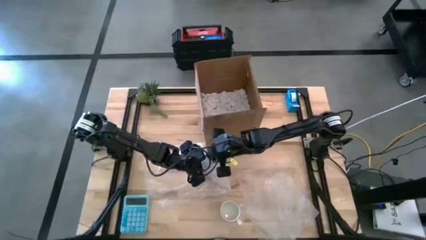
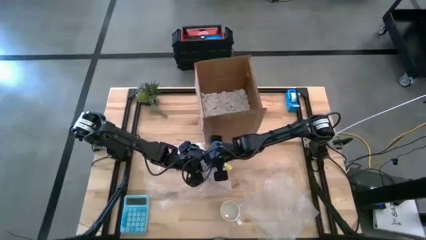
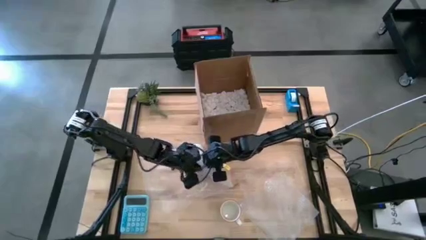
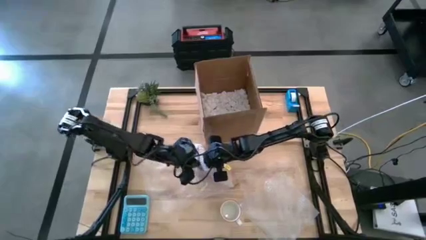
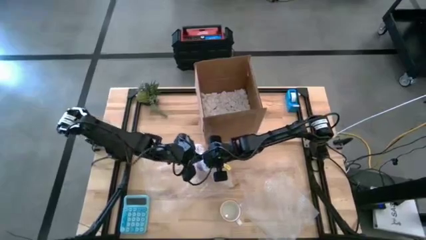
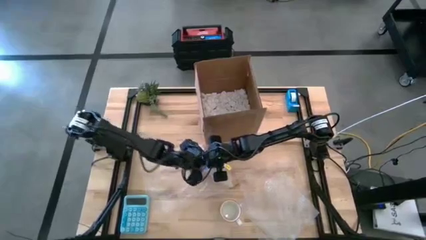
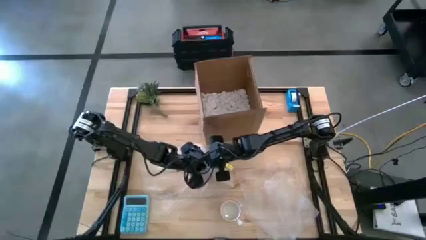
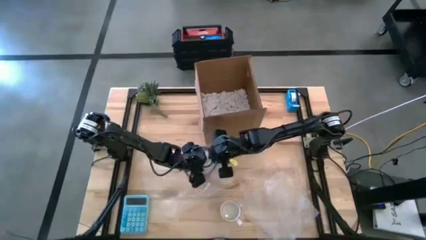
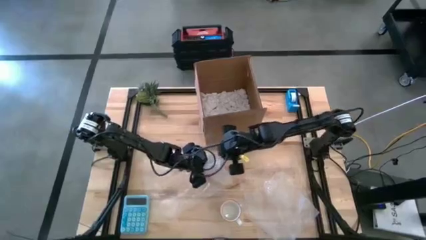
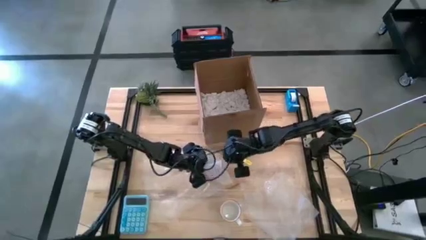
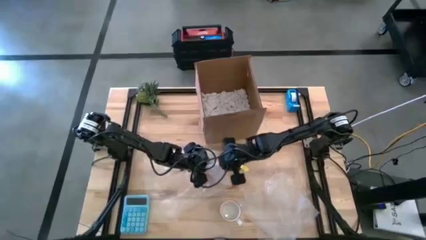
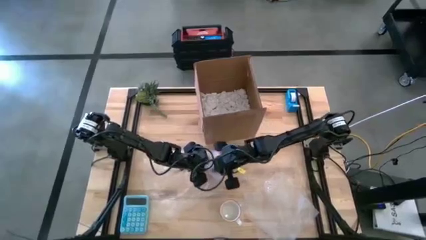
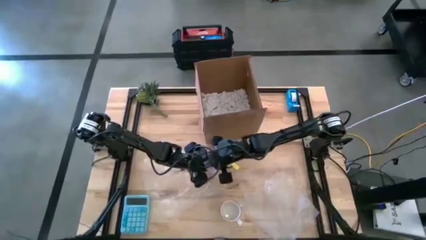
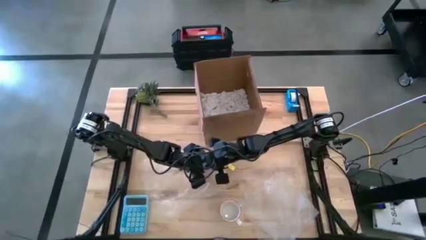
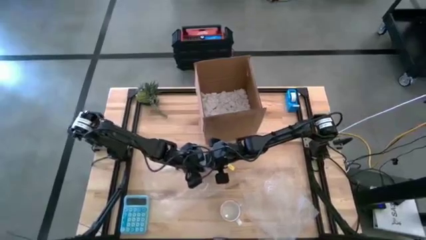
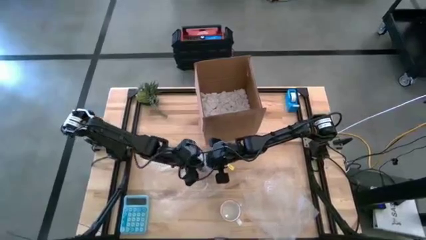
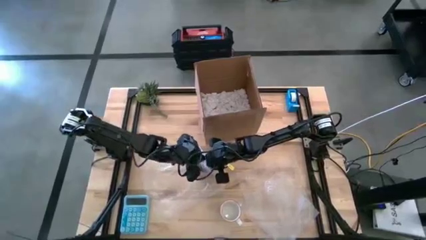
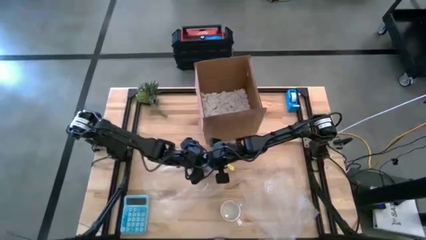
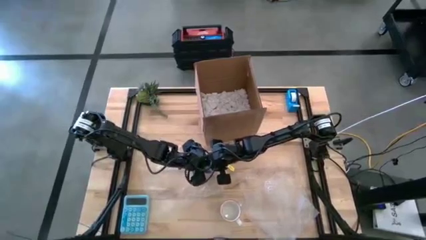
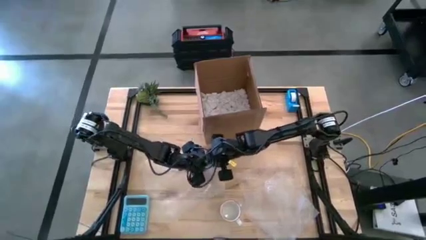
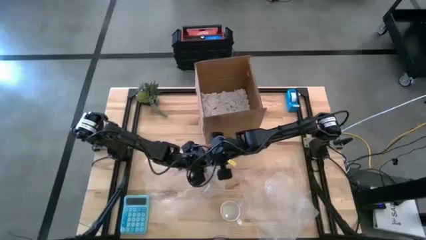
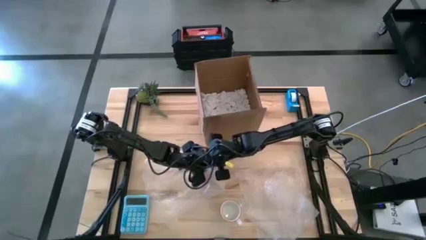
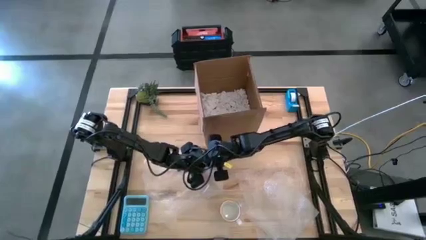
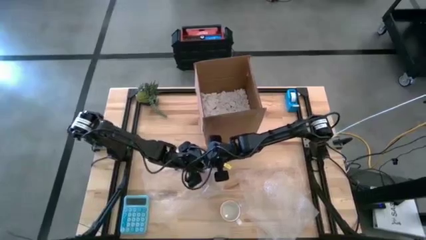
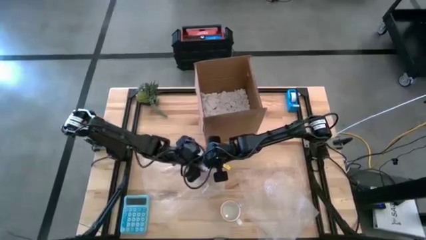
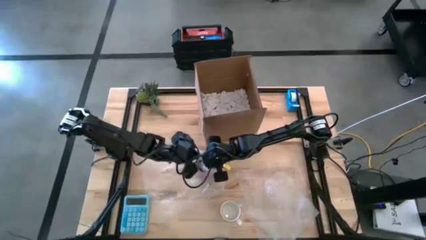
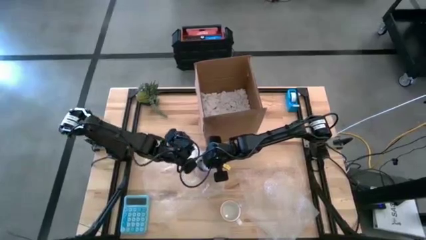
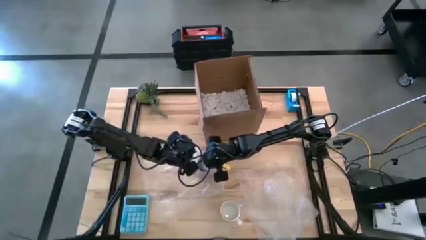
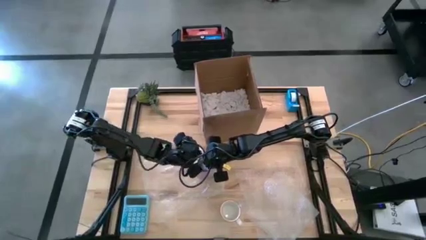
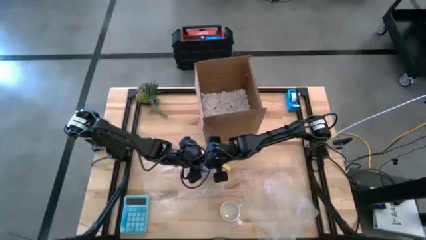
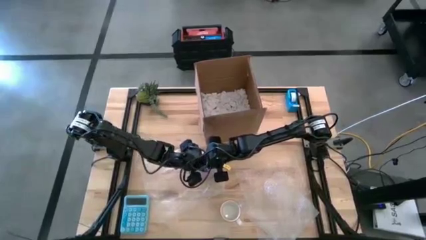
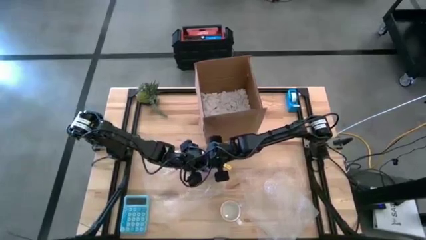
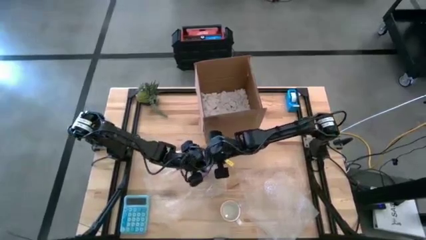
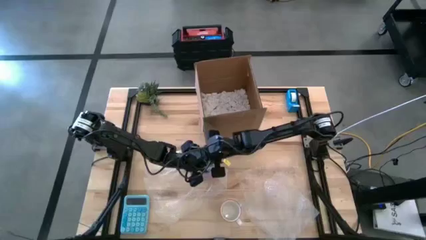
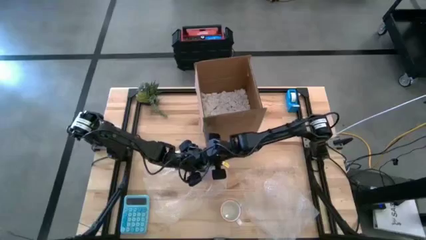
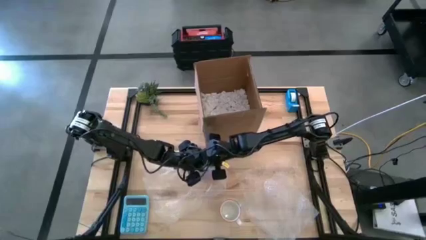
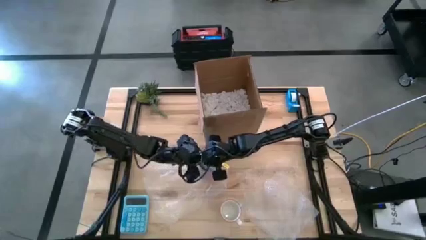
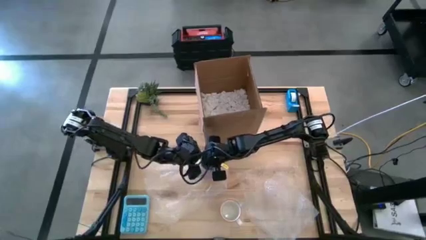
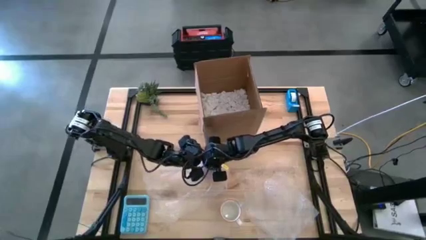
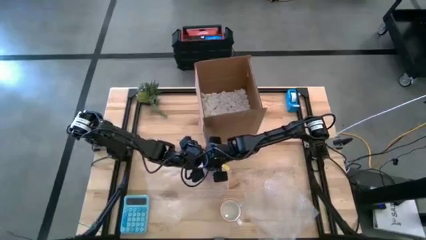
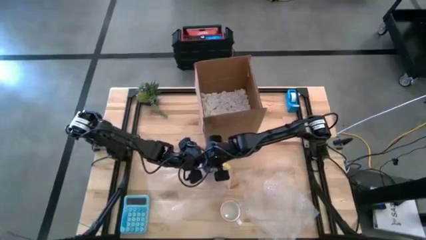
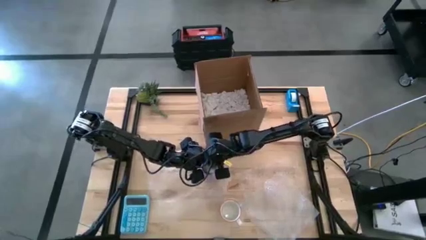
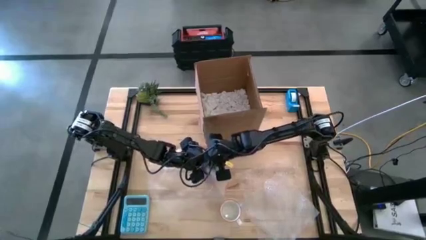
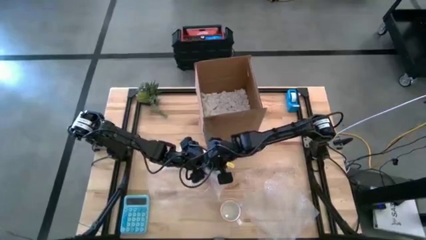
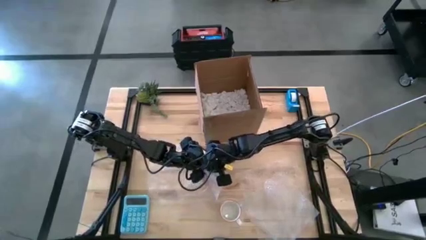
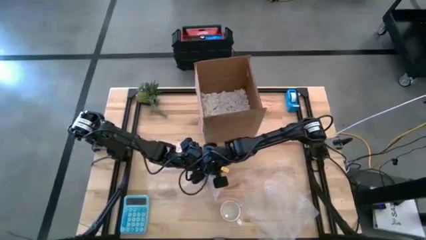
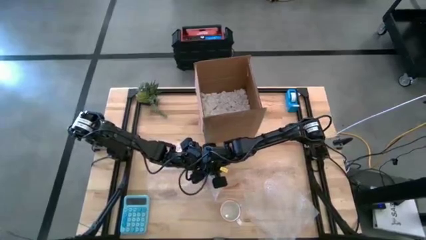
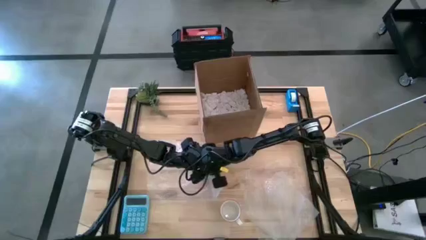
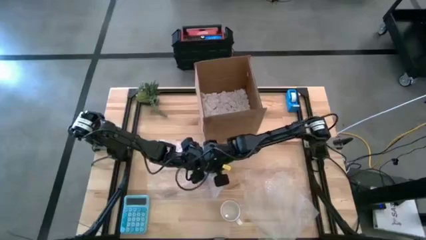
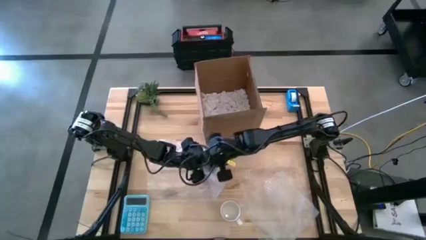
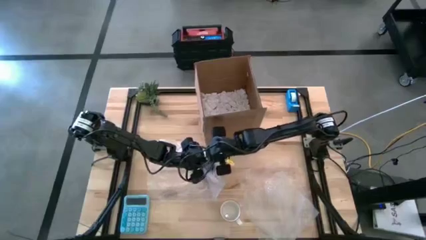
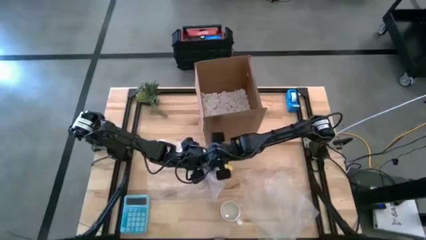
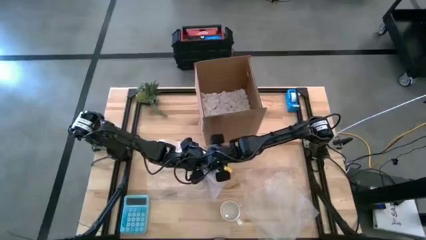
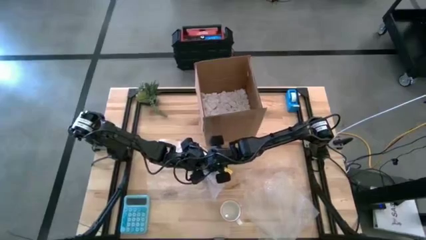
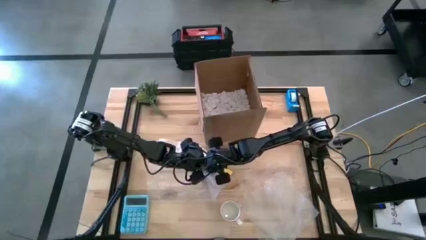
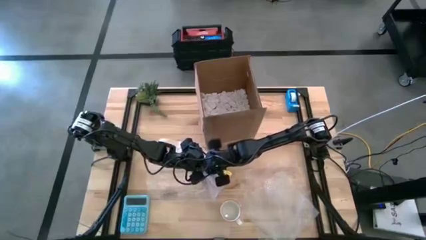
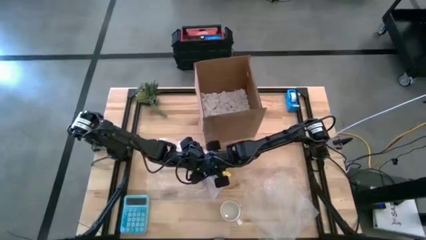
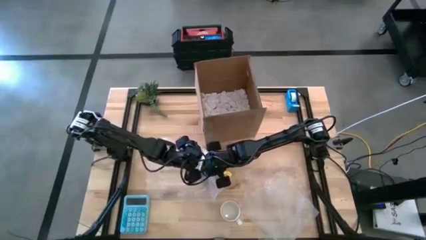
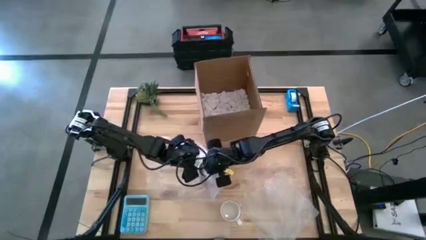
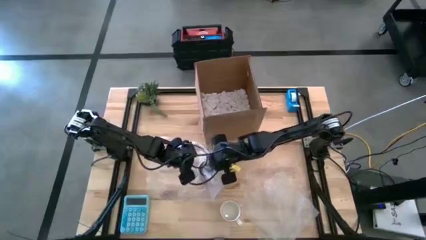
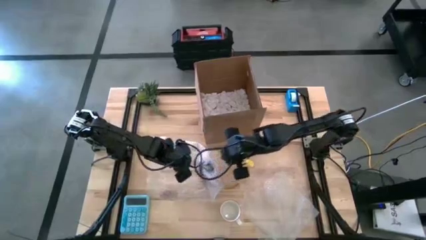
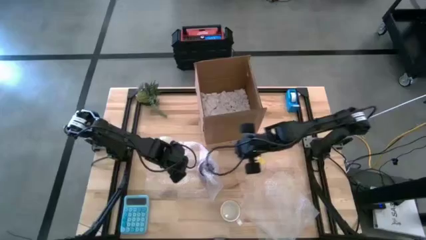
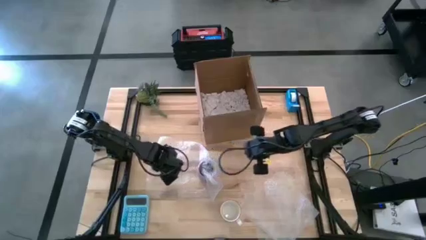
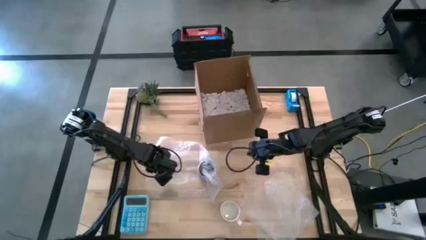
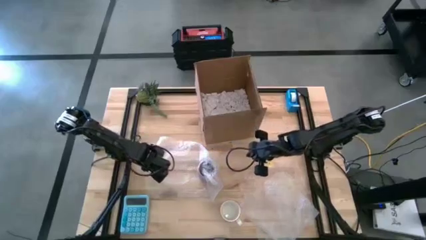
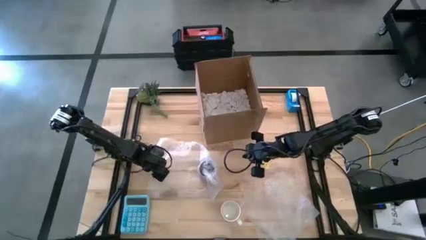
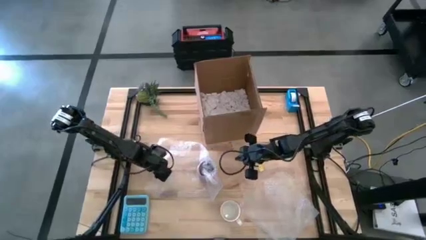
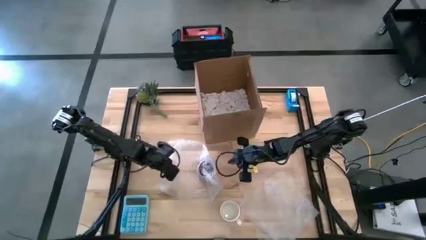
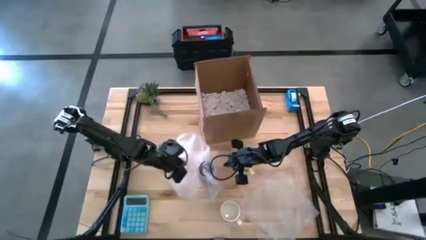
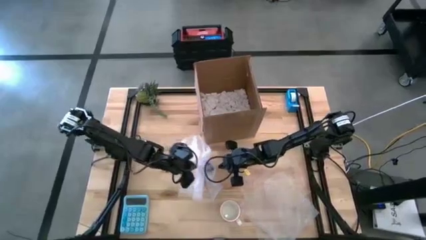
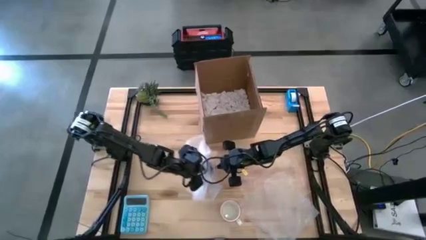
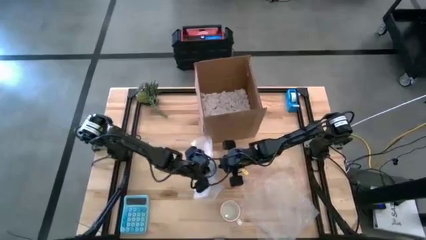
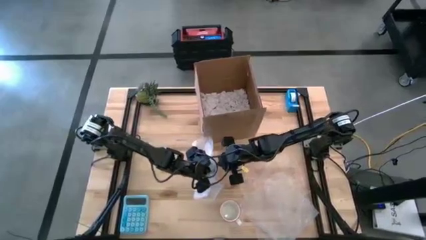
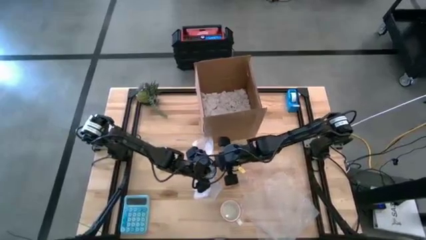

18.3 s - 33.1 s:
Task: wrap mug
Wrap the purple mug with the left bubble wrap
